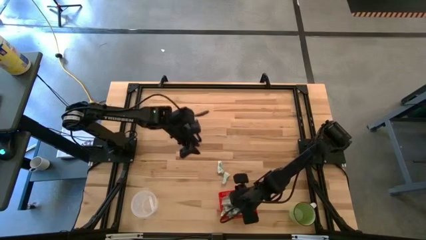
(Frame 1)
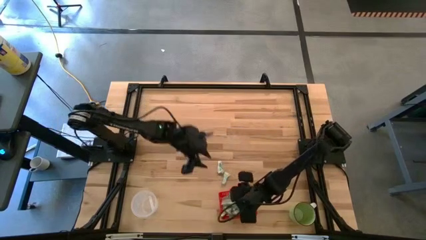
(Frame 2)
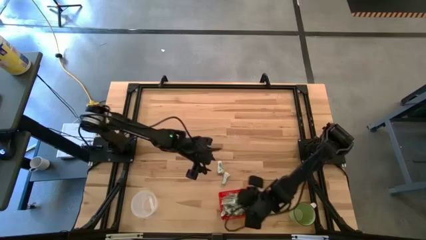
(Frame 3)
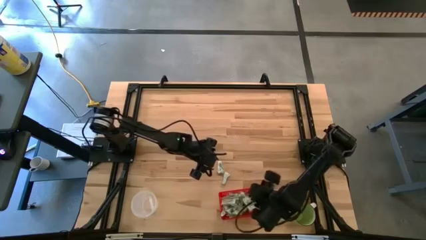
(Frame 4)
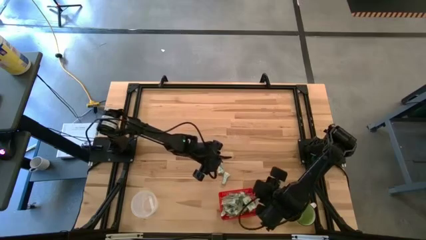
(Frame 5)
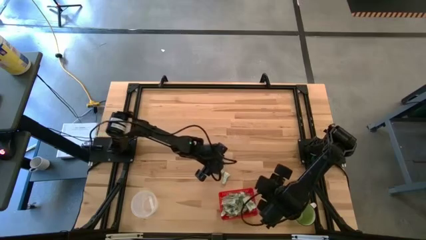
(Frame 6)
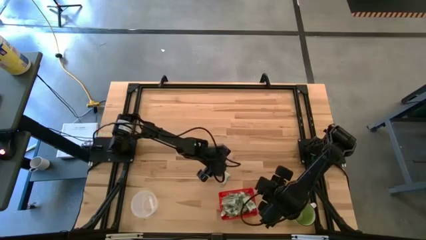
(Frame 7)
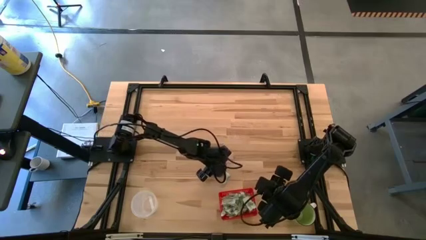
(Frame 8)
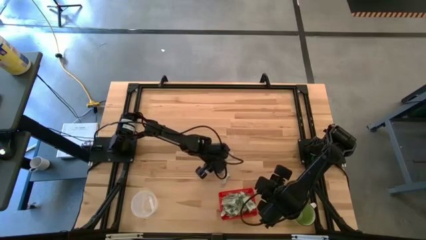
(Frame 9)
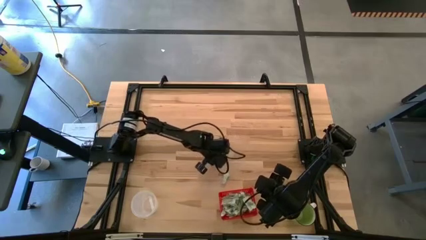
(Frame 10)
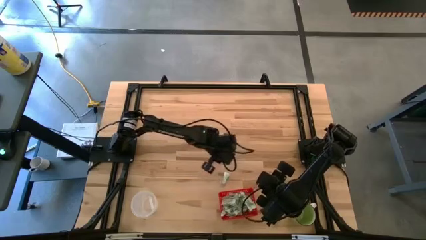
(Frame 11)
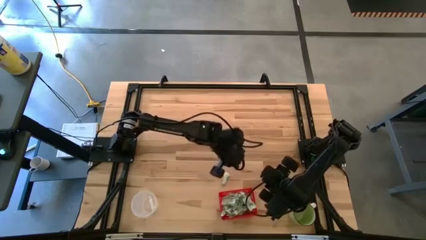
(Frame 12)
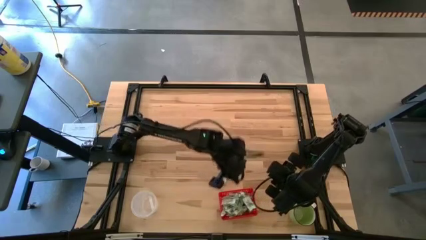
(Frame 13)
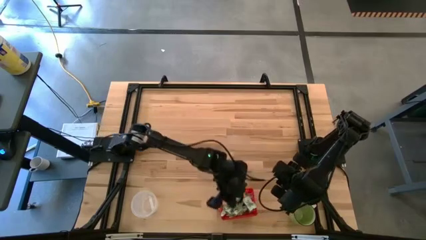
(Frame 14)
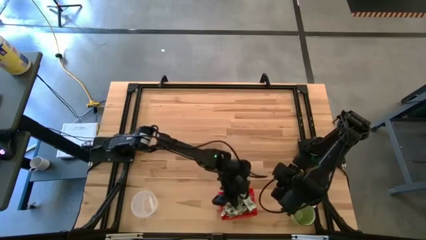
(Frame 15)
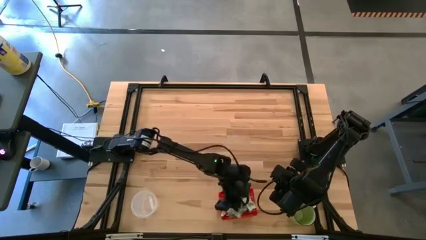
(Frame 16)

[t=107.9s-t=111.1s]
Task: Pick and place items into bin
Put the top white stevia packet into the red bin

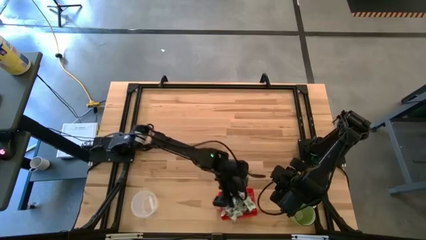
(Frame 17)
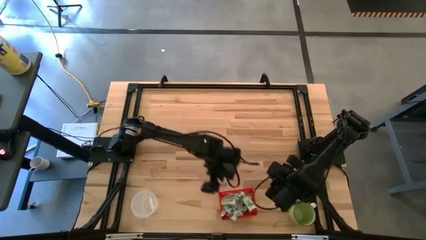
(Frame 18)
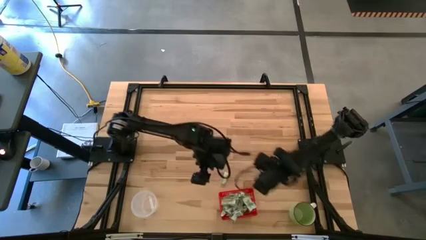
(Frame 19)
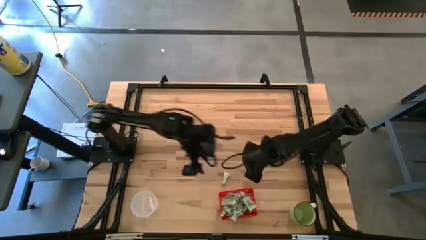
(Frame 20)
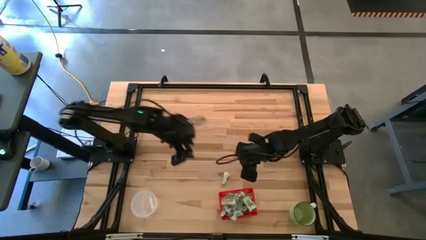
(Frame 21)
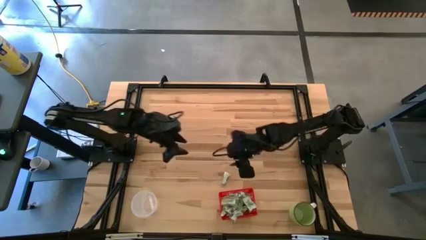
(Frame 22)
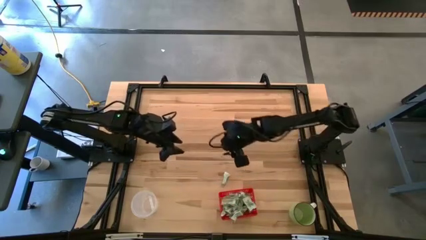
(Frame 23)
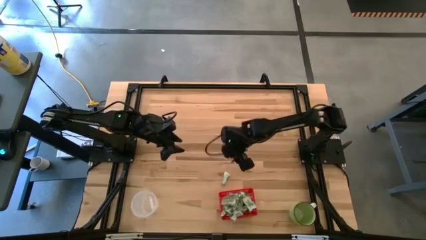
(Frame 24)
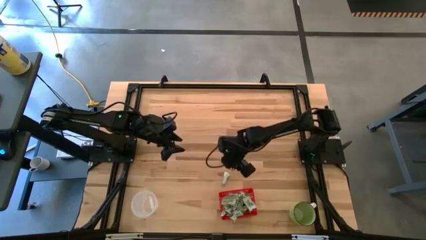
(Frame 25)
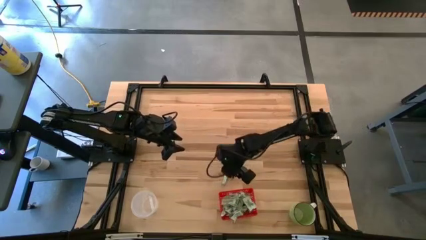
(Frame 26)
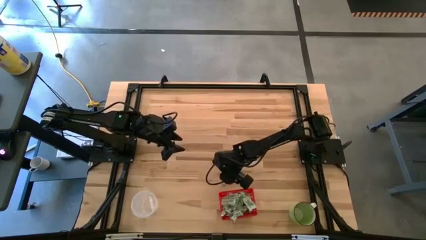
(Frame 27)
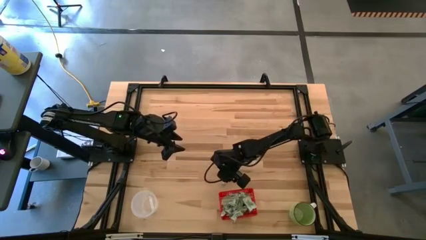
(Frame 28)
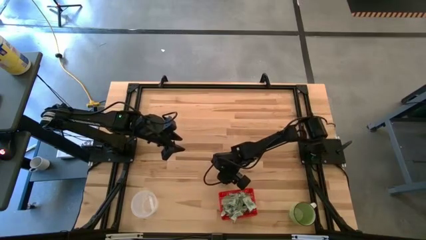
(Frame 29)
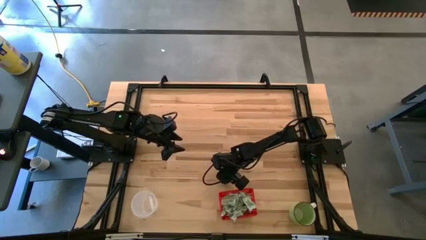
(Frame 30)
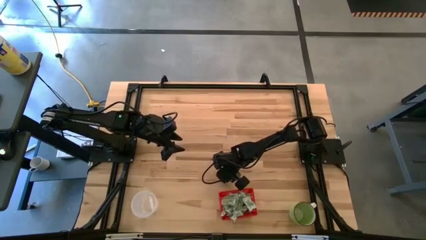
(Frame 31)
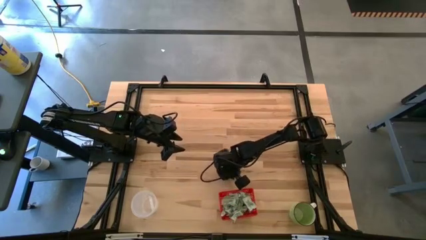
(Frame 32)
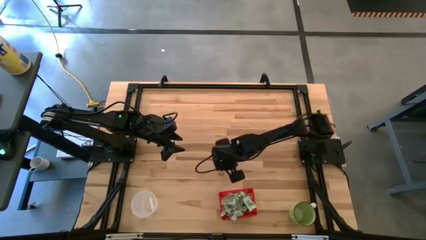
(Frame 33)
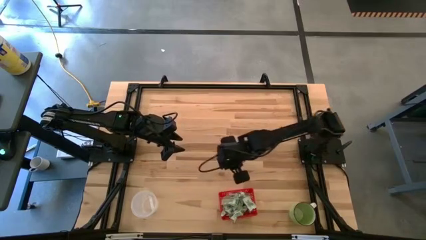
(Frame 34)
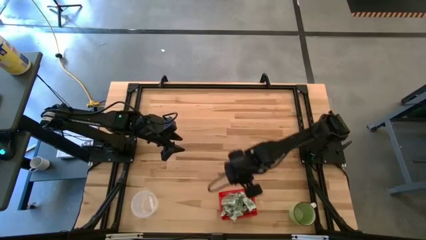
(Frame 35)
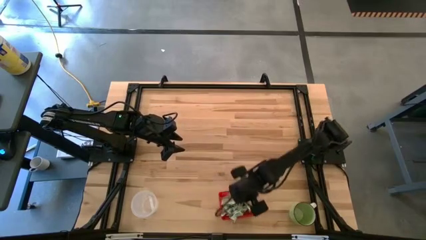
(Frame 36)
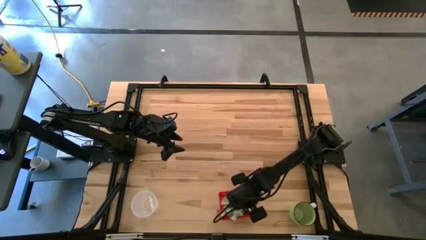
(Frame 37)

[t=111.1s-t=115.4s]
Put the white stevia packet into the red bin

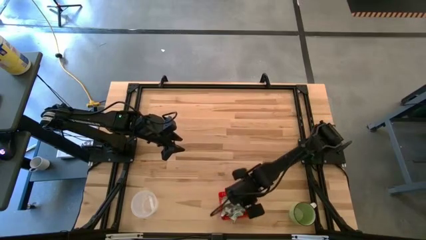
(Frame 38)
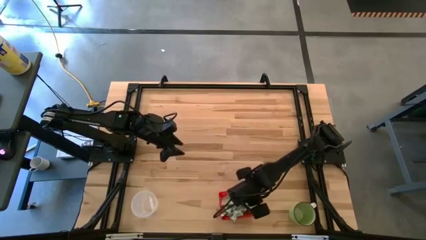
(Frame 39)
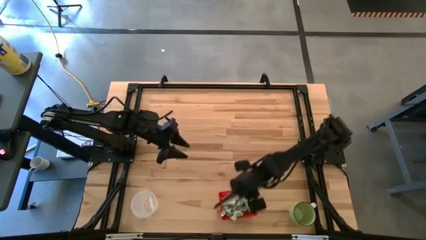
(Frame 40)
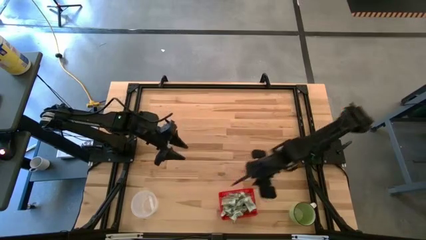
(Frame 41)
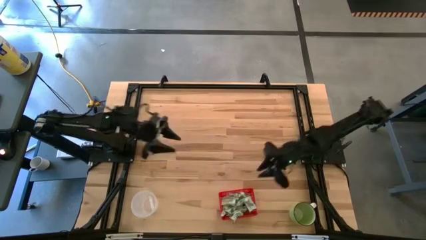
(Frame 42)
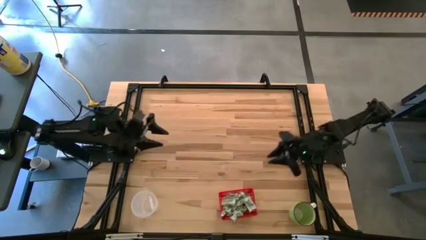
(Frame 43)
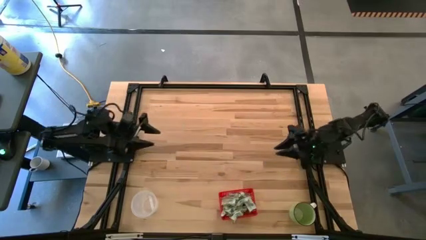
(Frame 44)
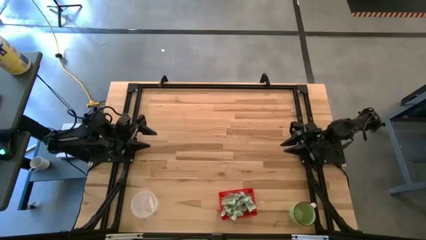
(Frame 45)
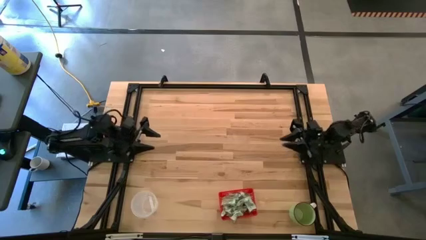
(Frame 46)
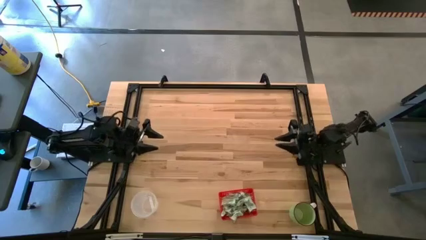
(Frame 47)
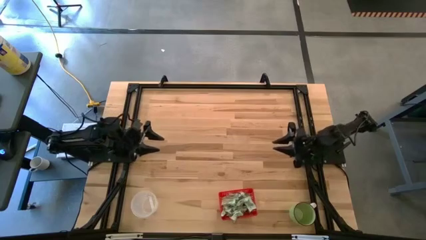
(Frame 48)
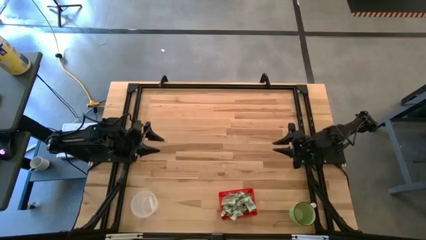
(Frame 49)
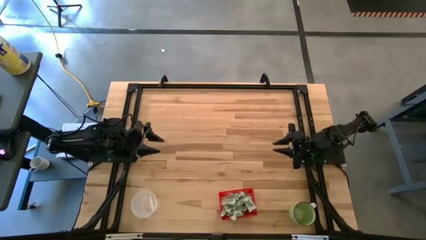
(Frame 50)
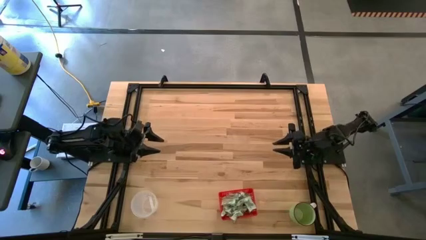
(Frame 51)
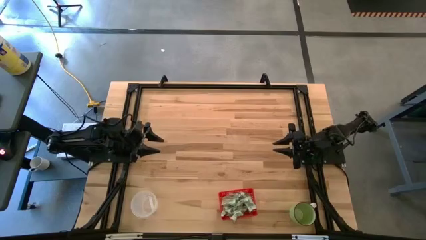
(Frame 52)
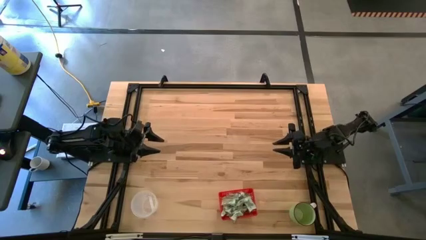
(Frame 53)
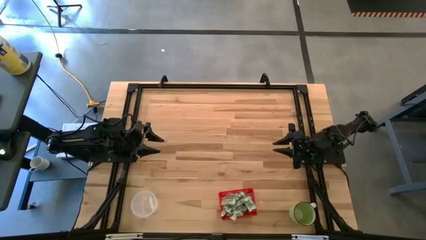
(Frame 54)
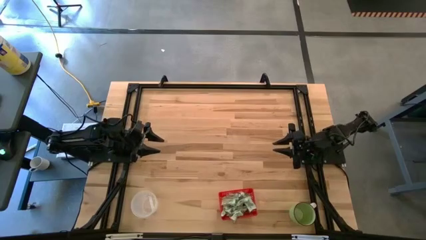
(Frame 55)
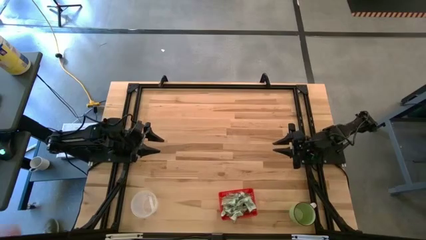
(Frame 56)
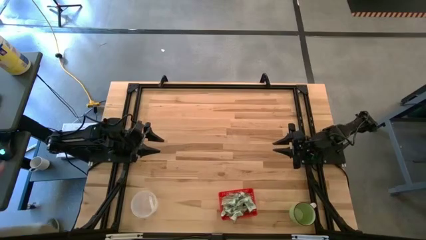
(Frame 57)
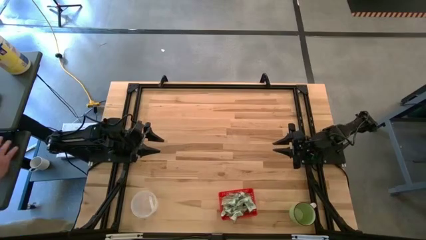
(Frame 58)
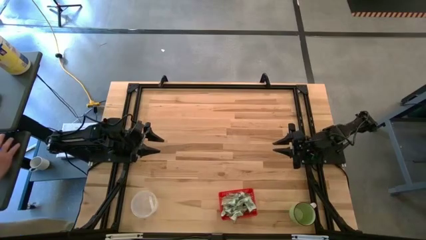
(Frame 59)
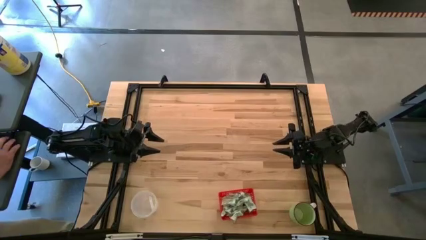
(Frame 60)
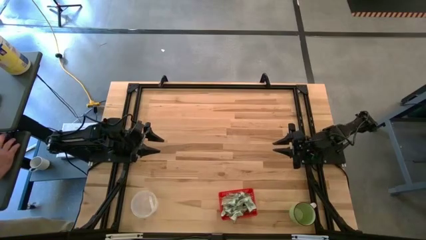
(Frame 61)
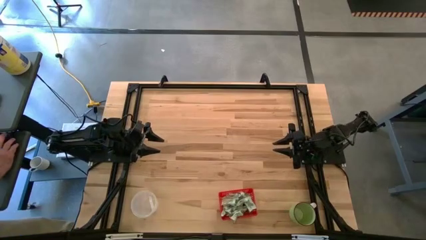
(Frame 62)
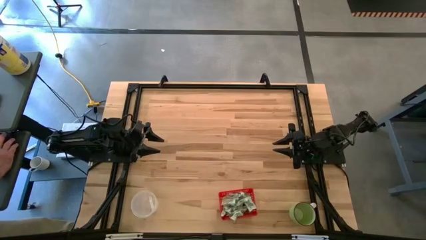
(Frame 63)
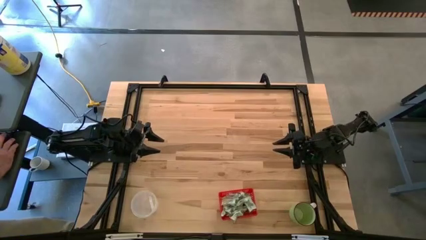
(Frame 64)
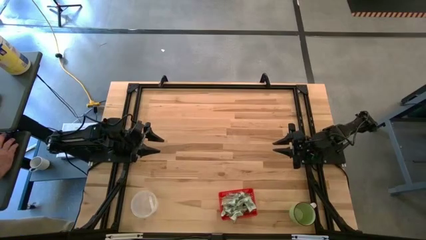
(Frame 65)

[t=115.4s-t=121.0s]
Return to Home Position

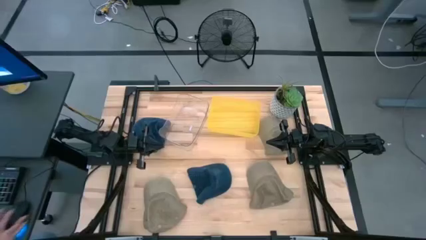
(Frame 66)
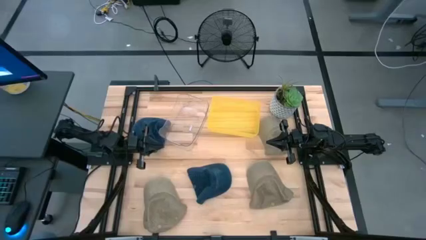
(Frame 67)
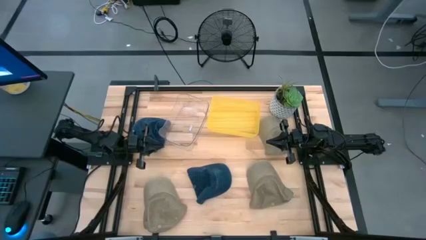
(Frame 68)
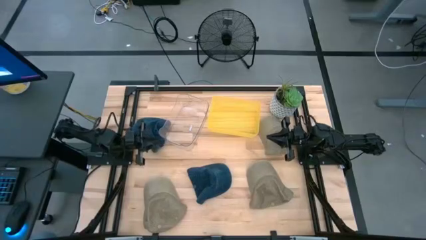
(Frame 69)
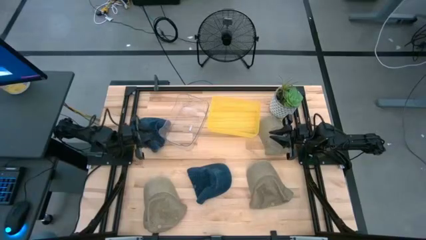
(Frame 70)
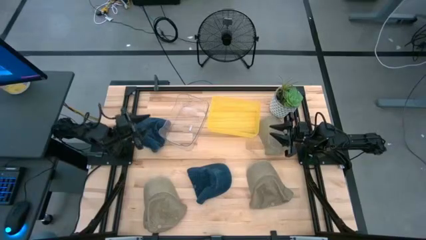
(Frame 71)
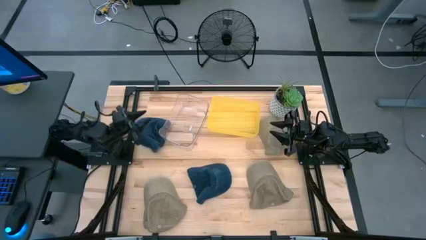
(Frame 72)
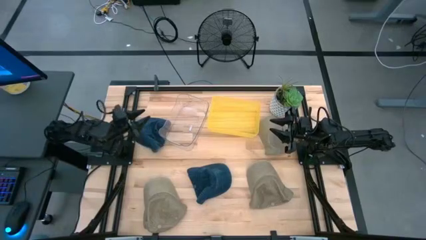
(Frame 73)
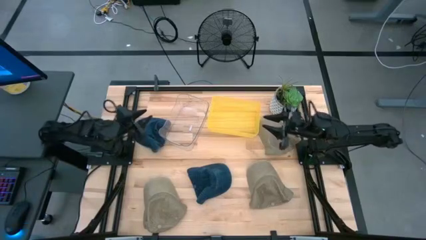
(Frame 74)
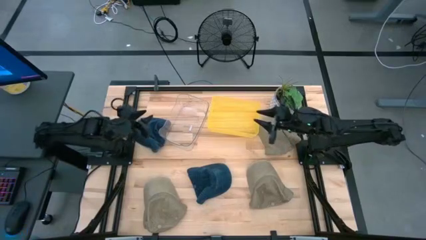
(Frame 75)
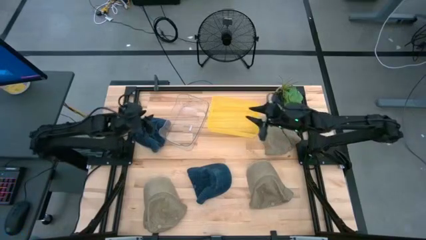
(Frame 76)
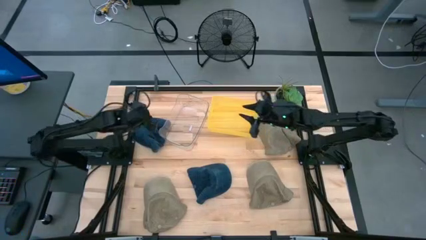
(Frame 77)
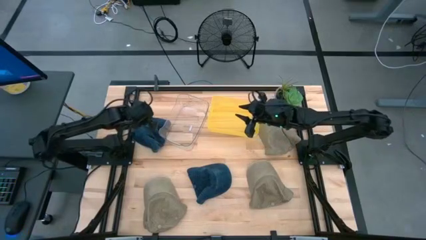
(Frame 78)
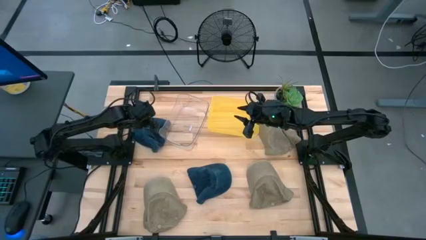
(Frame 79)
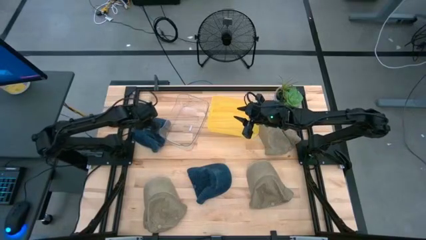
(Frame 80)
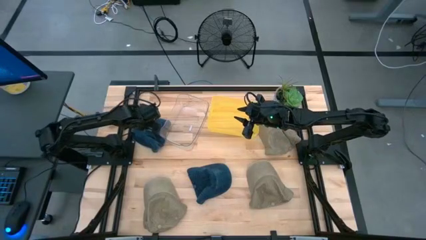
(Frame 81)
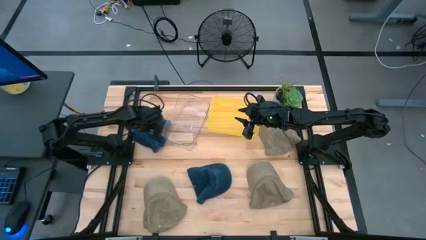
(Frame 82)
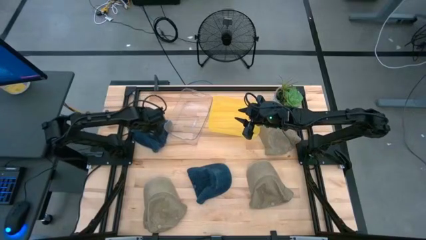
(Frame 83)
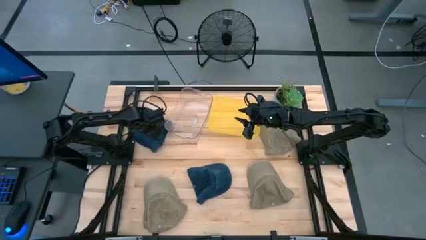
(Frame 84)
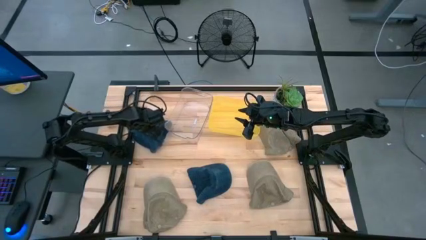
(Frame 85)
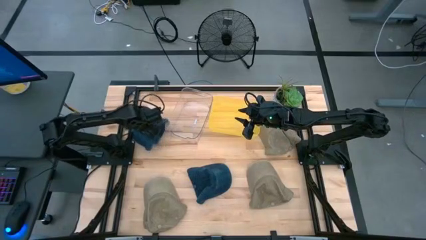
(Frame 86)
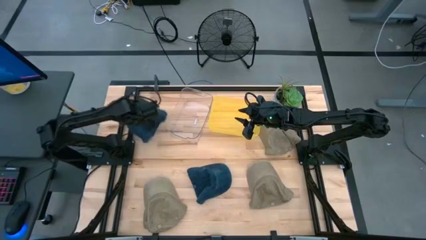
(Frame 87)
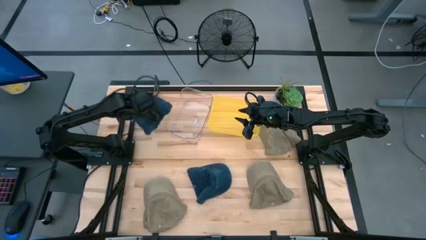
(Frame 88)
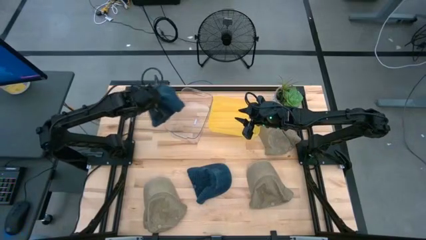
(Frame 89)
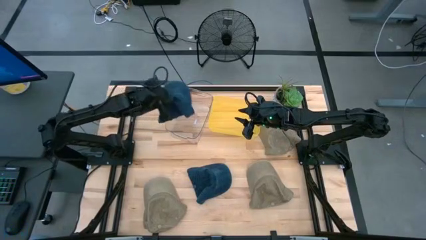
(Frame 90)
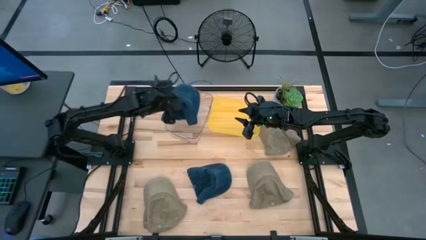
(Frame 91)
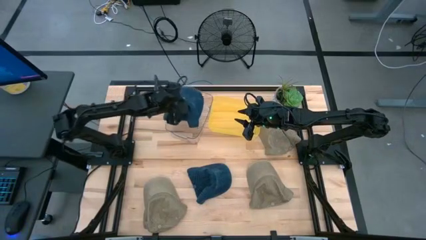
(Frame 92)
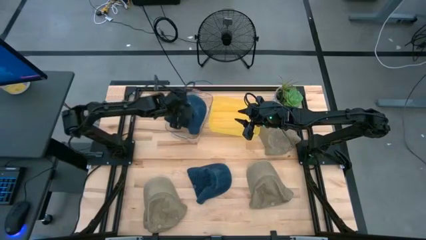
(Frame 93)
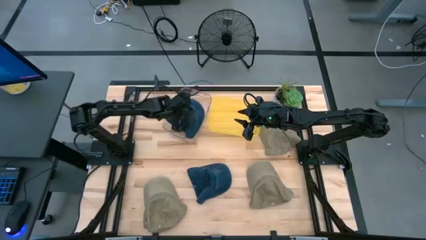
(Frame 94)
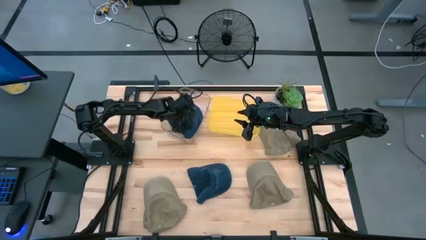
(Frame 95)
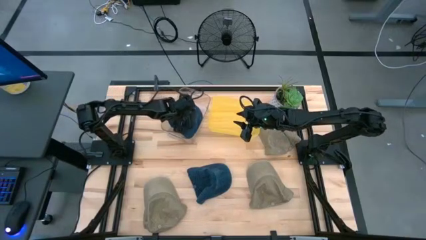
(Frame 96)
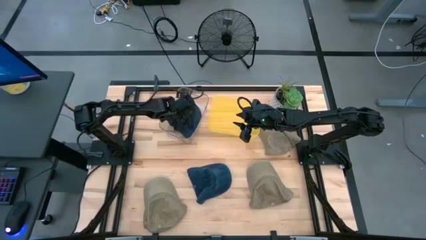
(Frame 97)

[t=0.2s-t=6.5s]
Task: Pick & Place hat
Put the top blue cap into the transparent bin
